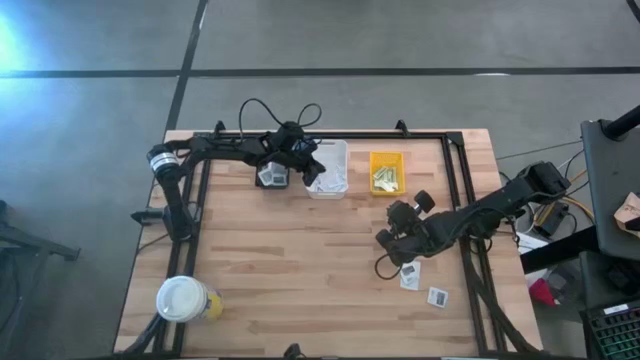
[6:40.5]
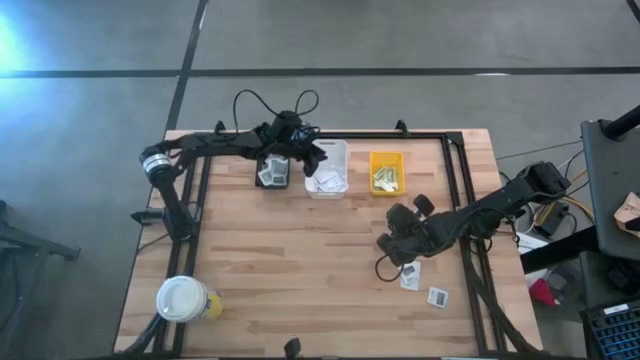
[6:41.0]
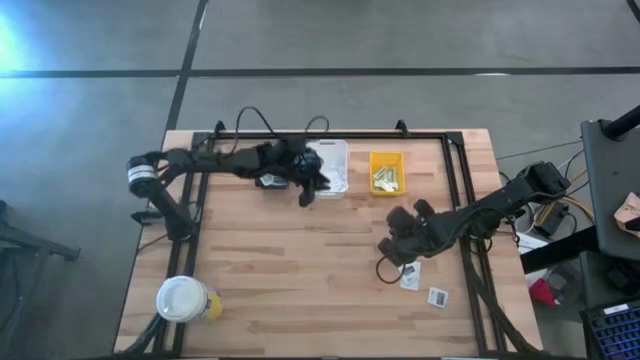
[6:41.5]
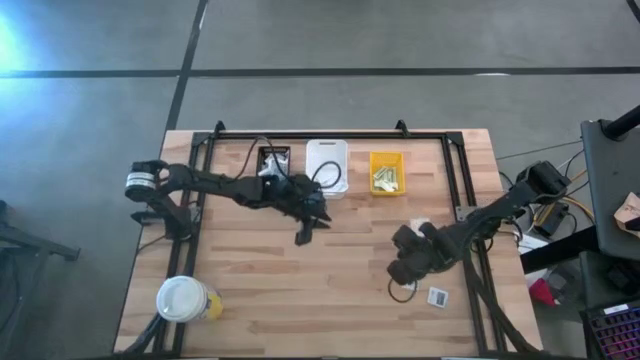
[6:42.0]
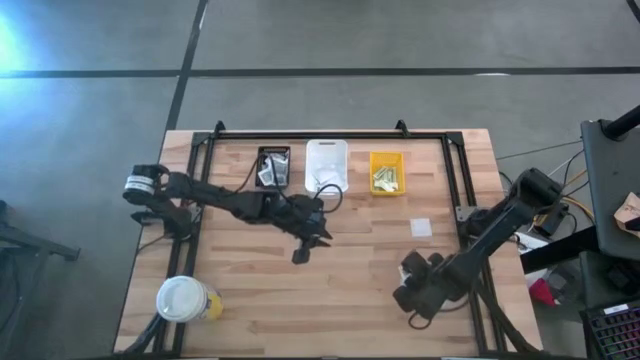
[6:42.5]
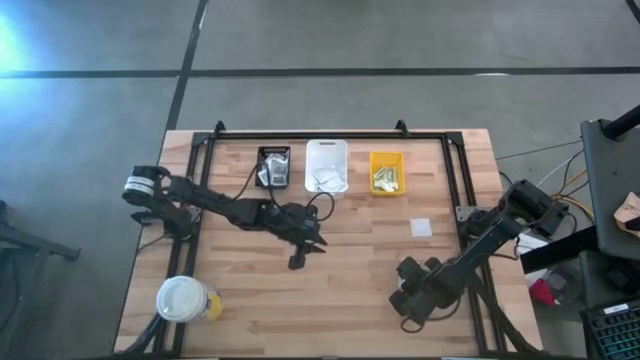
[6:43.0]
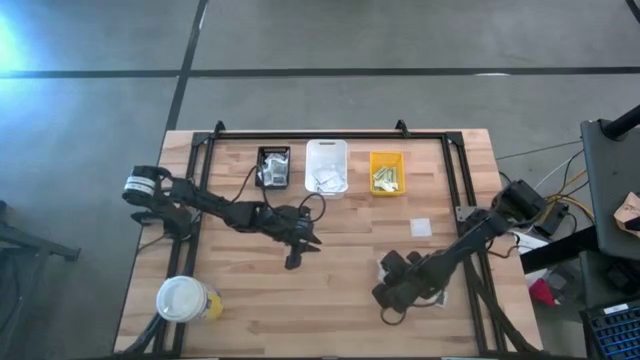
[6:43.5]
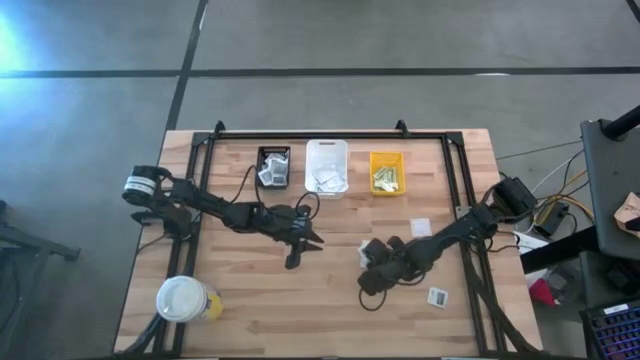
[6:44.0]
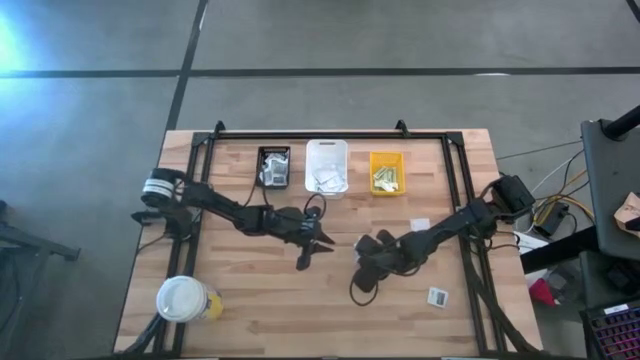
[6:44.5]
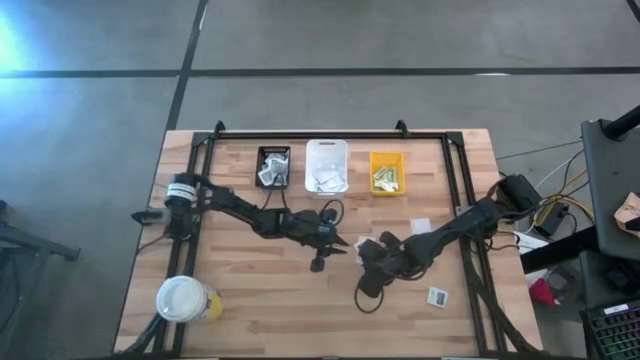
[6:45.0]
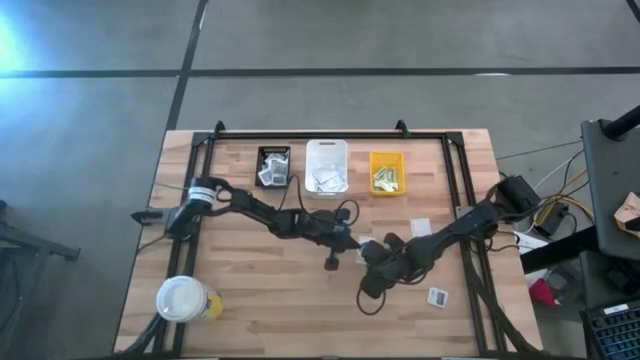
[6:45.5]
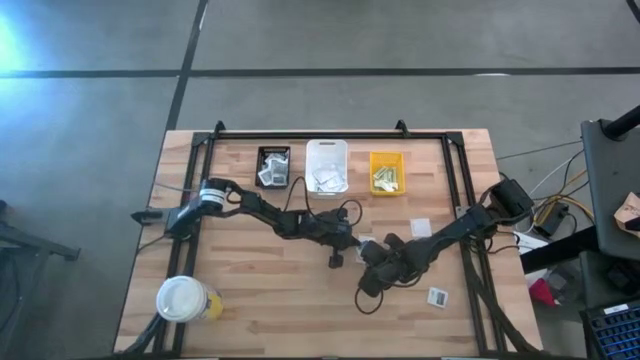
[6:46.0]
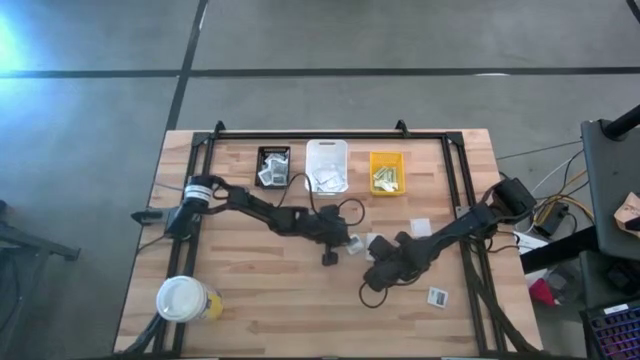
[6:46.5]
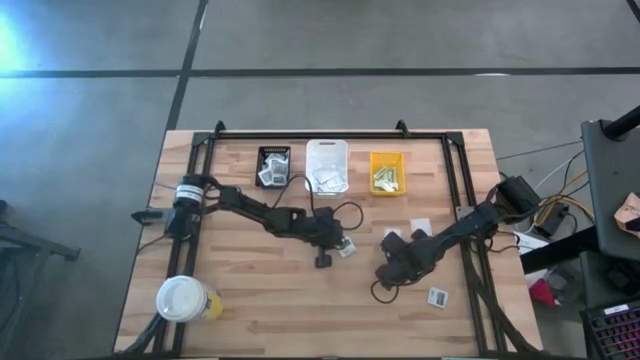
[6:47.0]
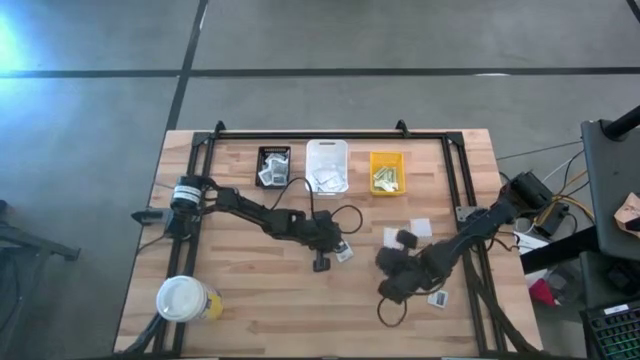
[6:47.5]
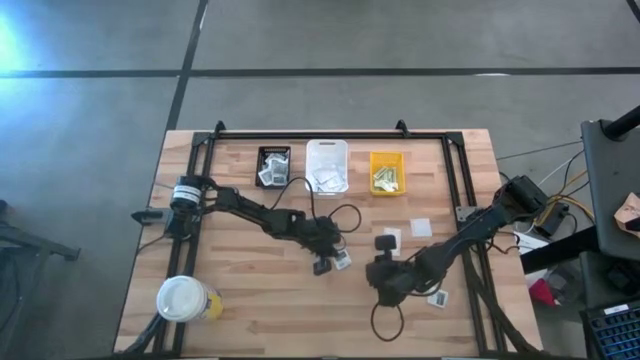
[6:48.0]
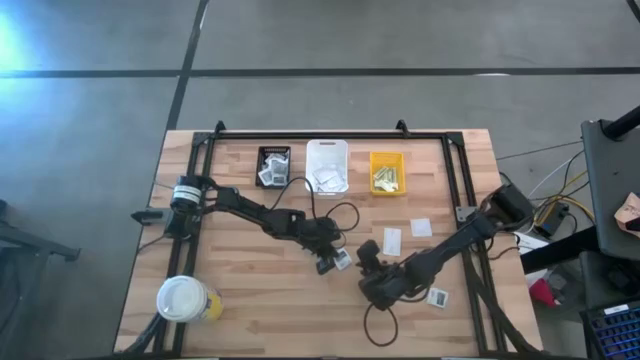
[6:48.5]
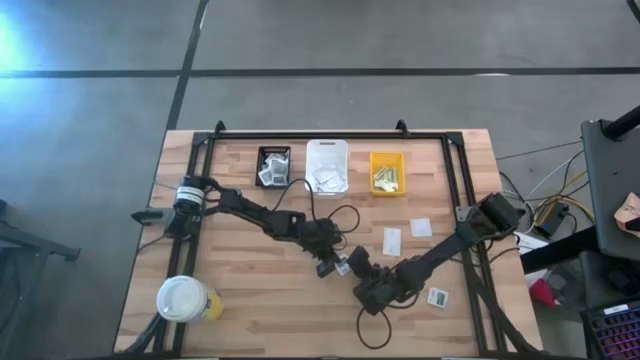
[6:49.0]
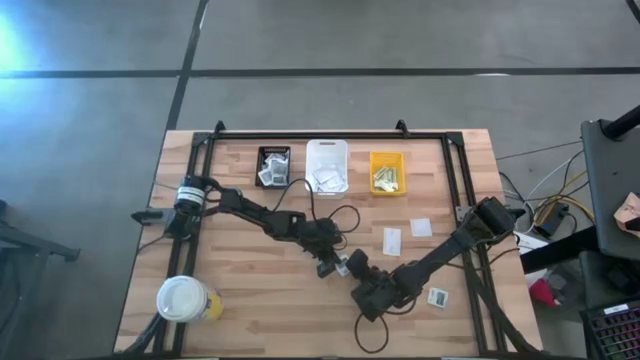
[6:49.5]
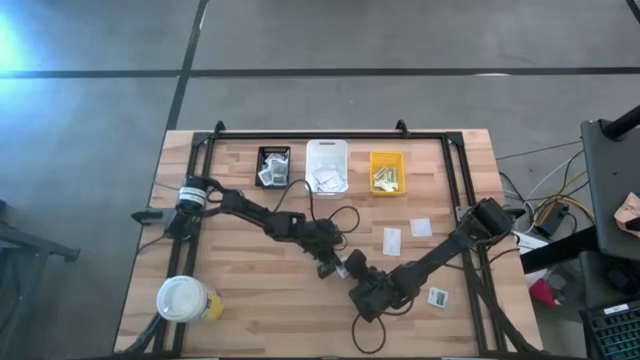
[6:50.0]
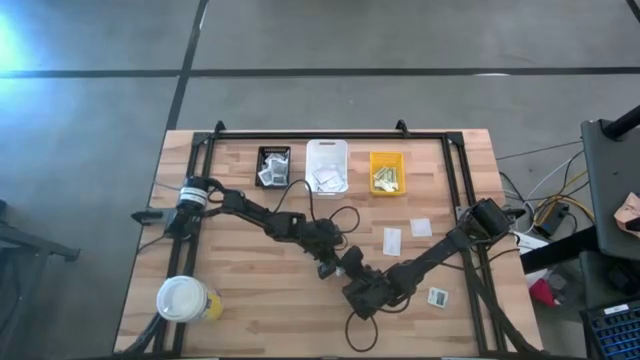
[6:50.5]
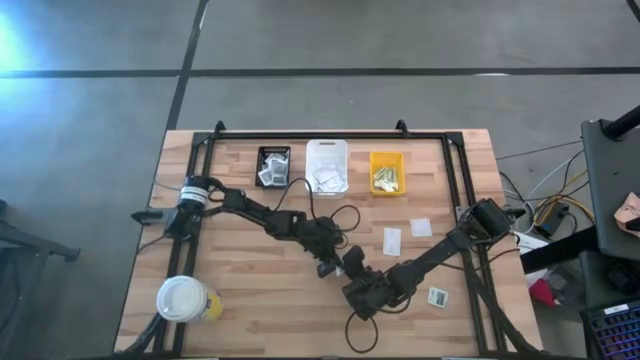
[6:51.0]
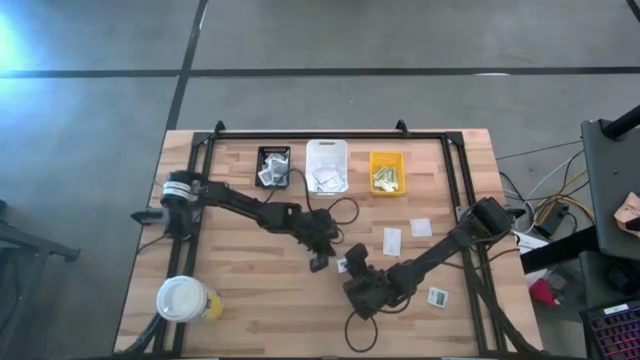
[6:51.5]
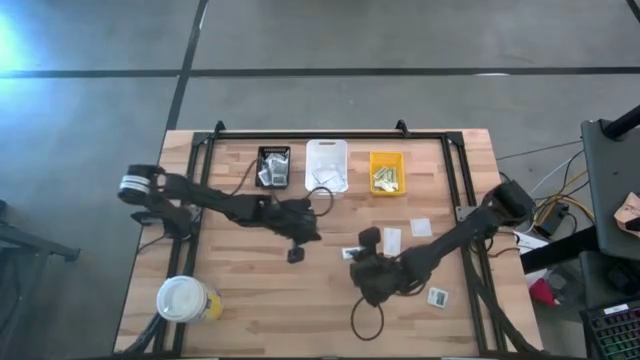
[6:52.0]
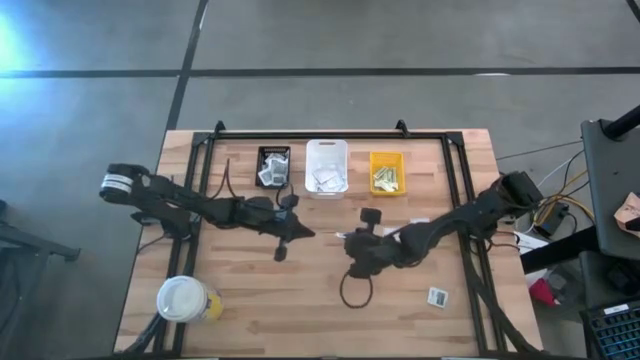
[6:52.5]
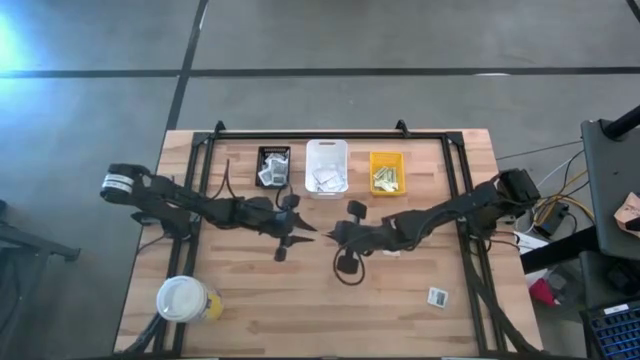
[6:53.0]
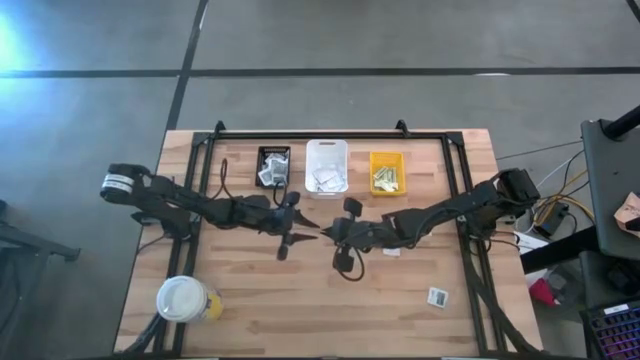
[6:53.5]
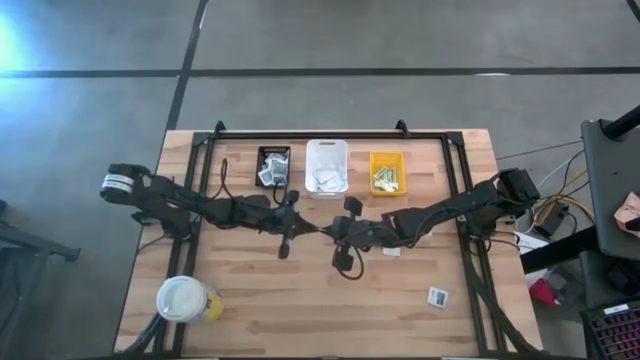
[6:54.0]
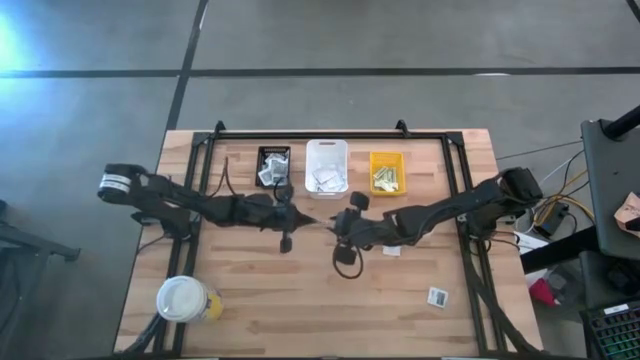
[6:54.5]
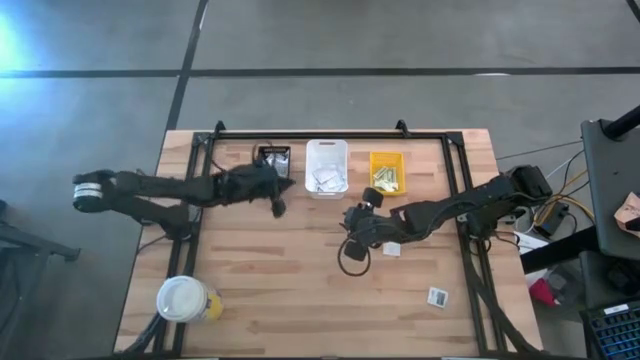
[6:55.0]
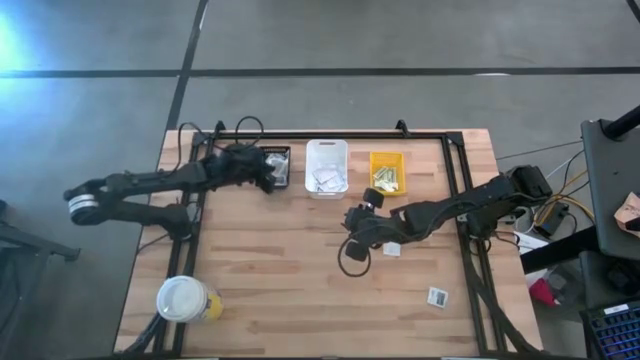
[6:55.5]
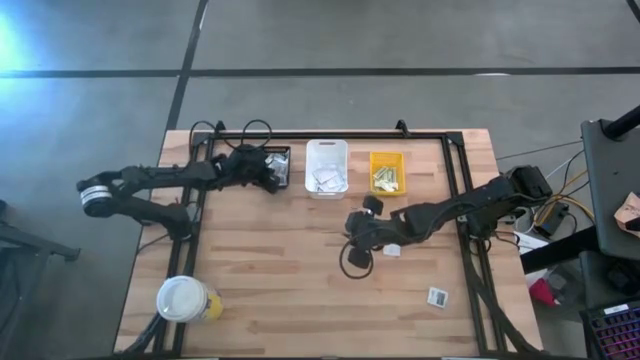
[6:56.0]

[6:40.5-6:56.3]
Task: Pick & Place First Aid Supplies
Put the towelette pack into the black basket

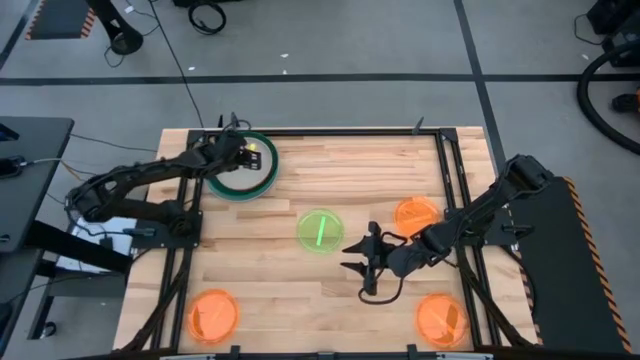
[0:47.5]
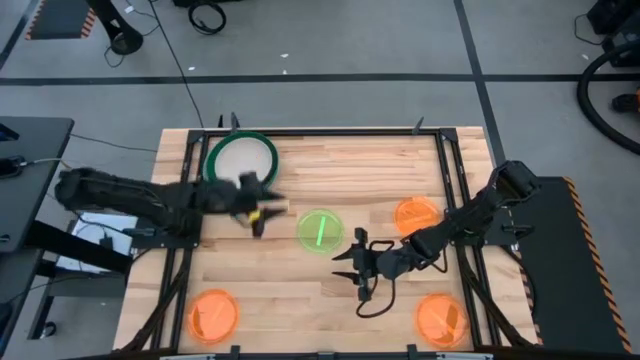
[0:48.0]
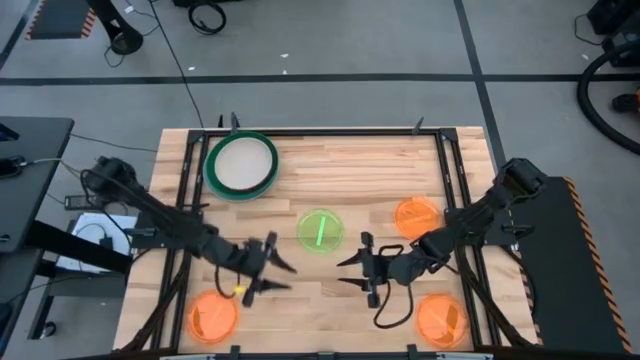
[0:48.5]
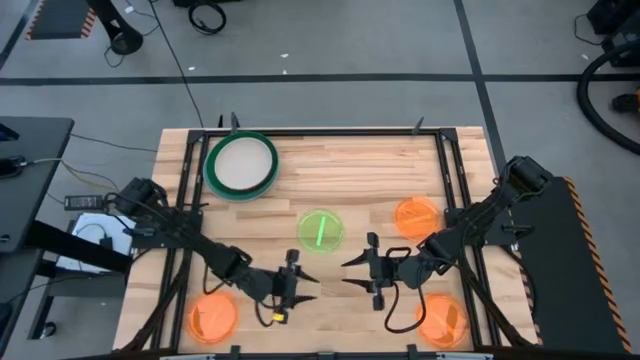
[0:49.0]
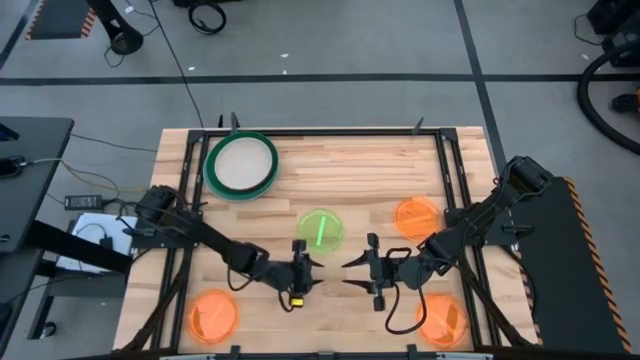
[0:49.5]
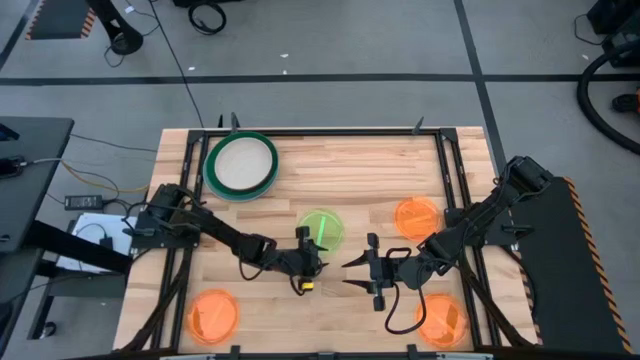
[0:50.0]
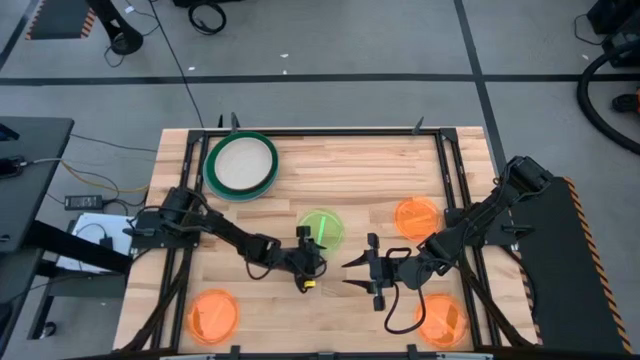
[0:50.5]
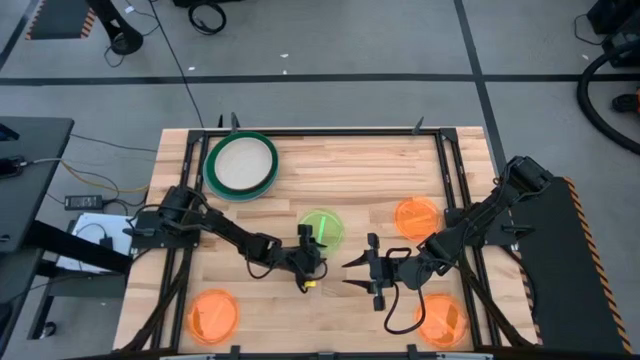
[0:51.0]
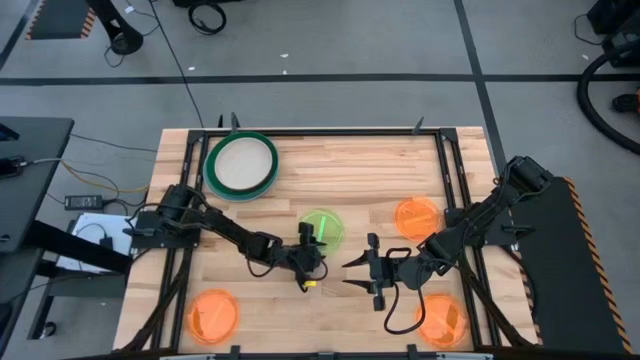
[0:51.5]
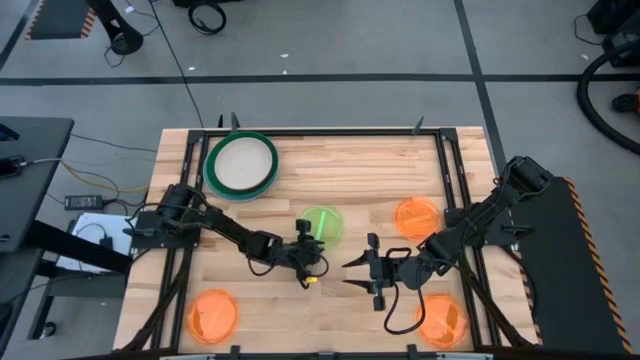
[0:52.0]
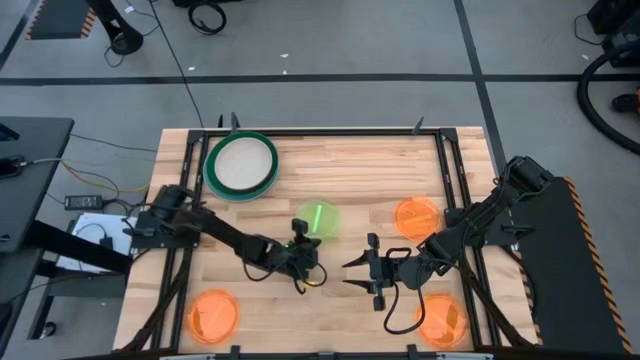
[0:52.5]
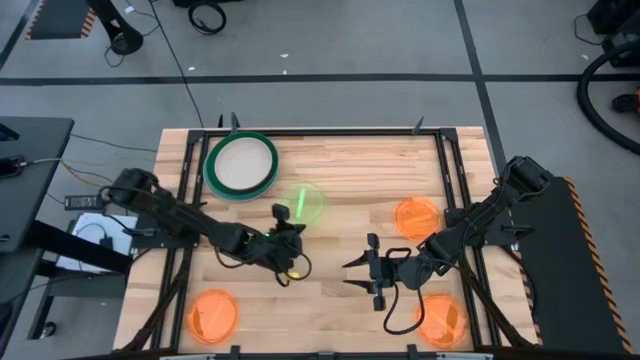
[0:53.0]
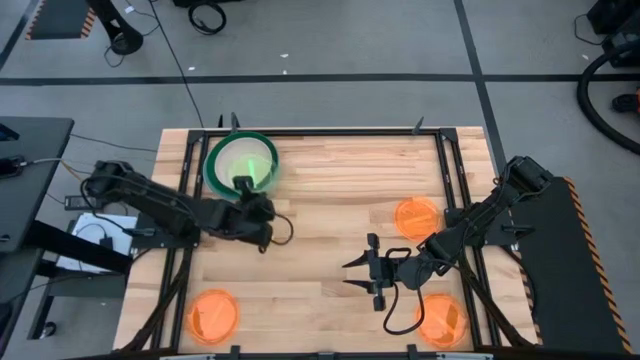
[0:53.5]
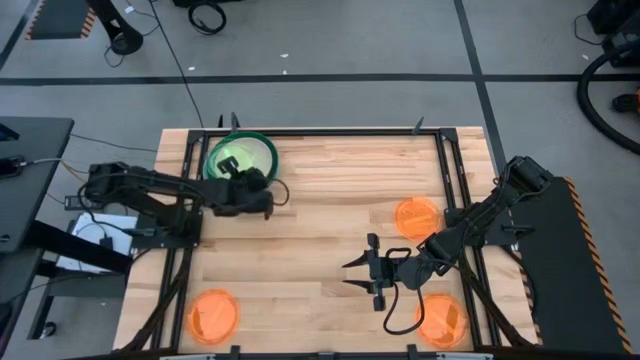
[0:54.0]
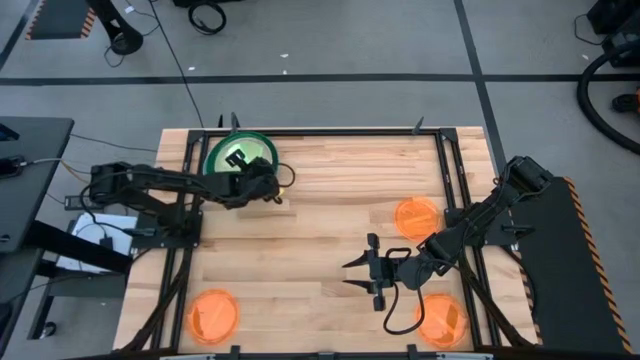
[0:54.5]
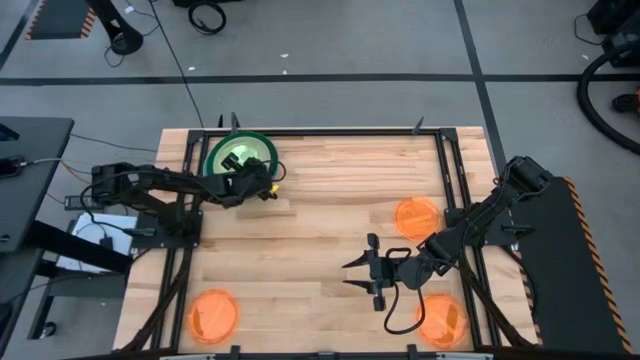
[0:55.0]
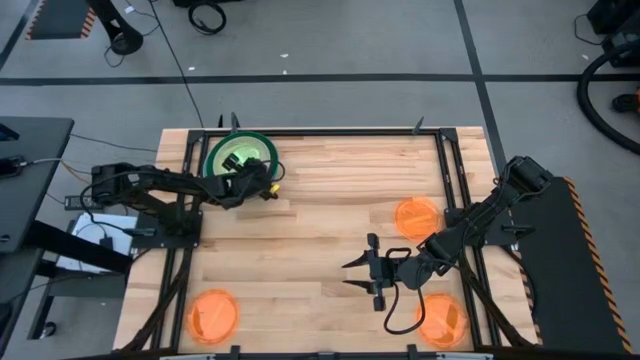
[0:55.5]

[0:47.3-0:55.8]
Task: Stack plastic plates
Stack the light green plate on top of the white plate
